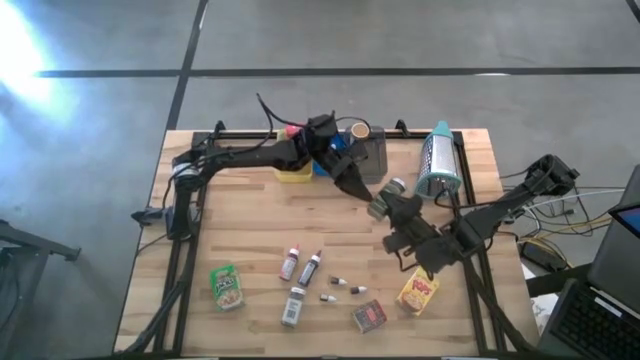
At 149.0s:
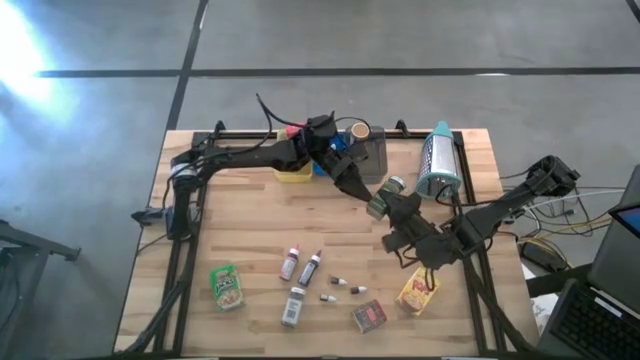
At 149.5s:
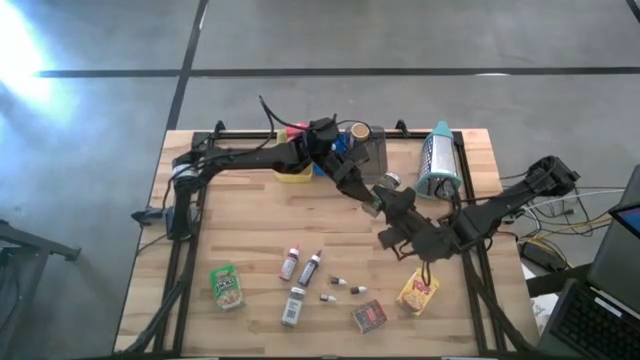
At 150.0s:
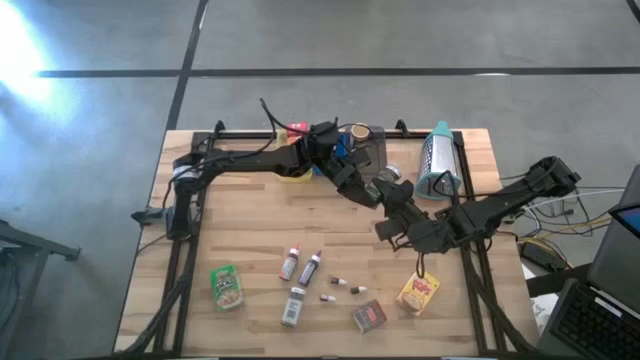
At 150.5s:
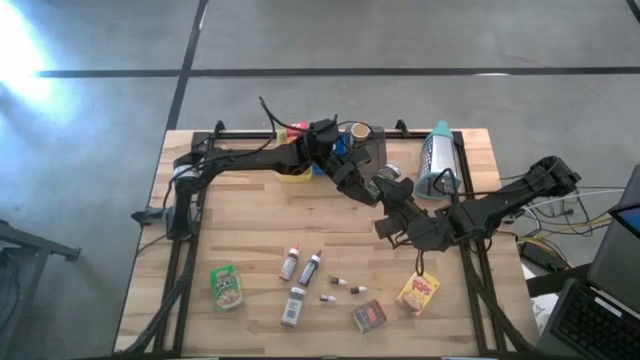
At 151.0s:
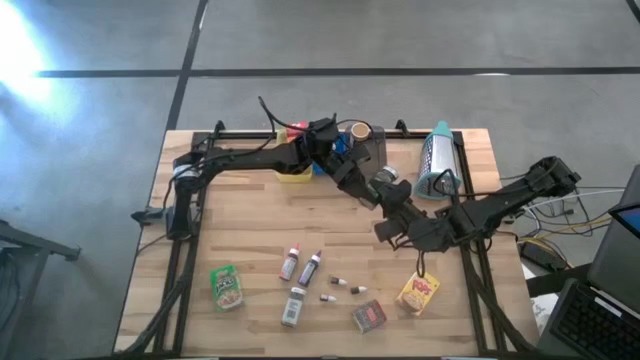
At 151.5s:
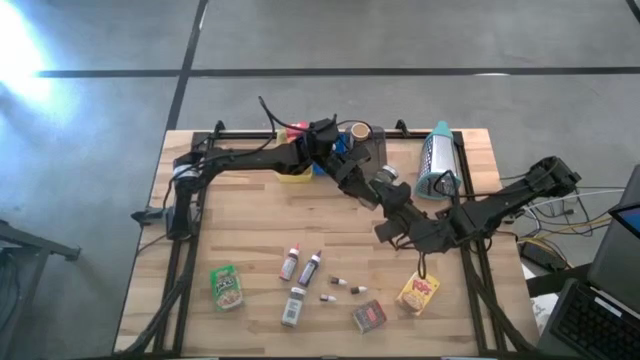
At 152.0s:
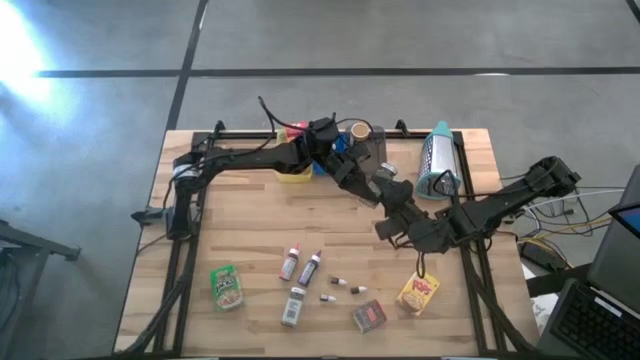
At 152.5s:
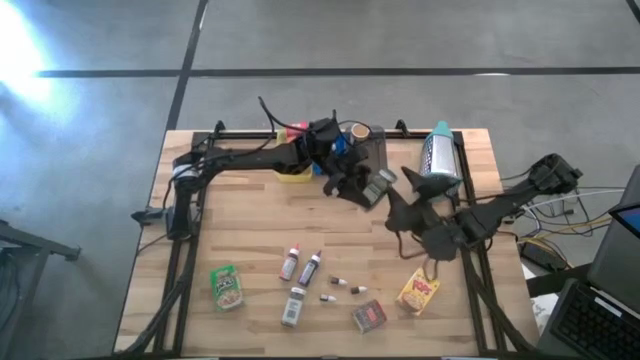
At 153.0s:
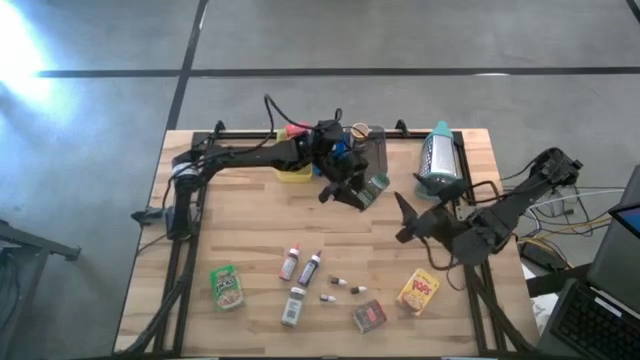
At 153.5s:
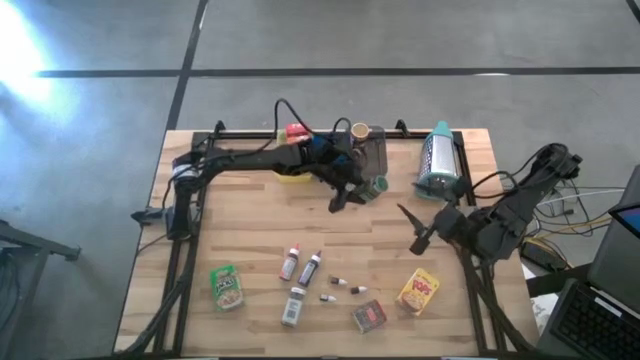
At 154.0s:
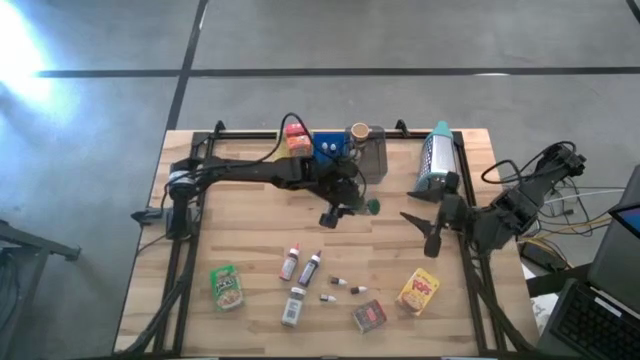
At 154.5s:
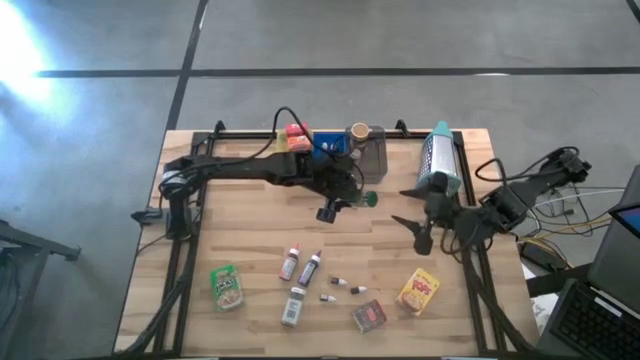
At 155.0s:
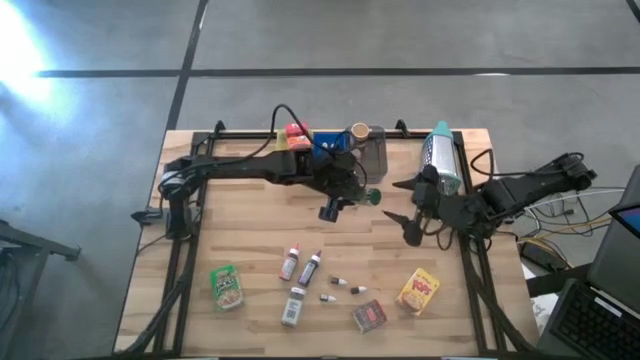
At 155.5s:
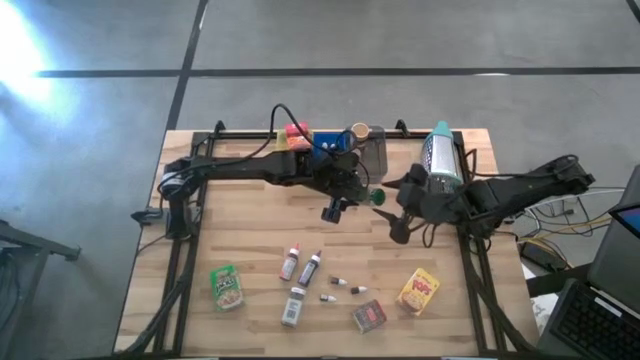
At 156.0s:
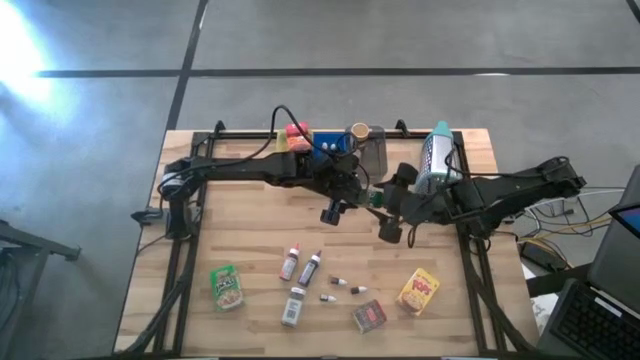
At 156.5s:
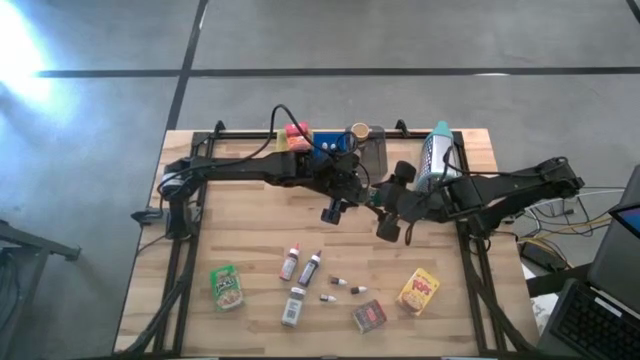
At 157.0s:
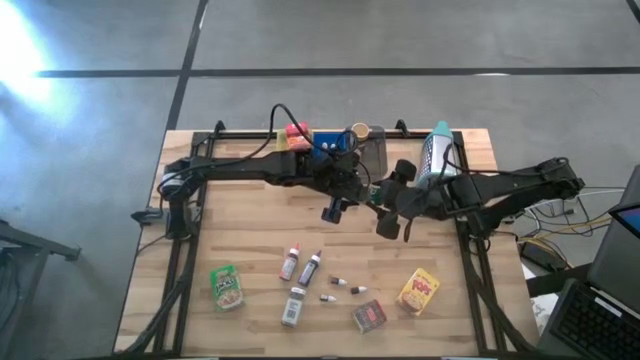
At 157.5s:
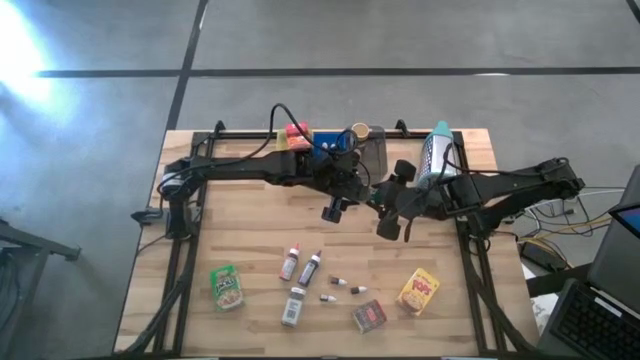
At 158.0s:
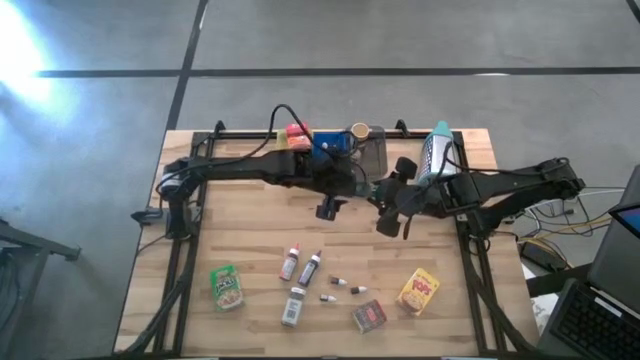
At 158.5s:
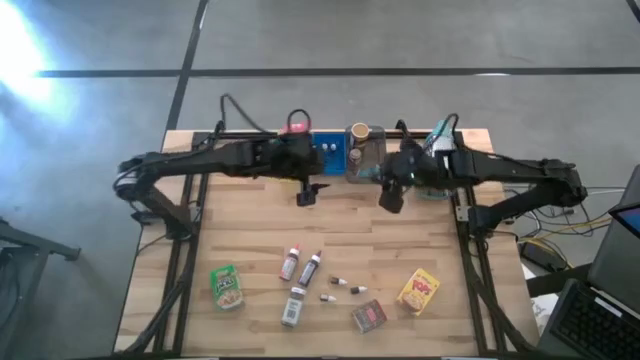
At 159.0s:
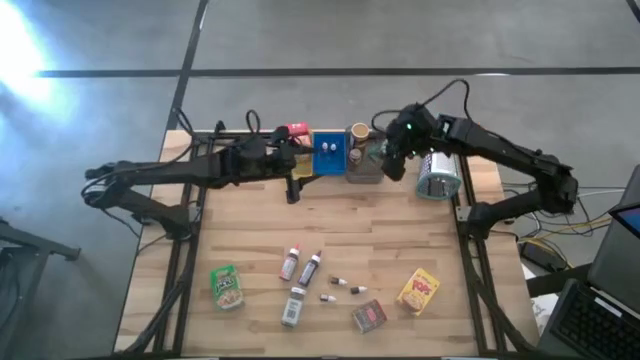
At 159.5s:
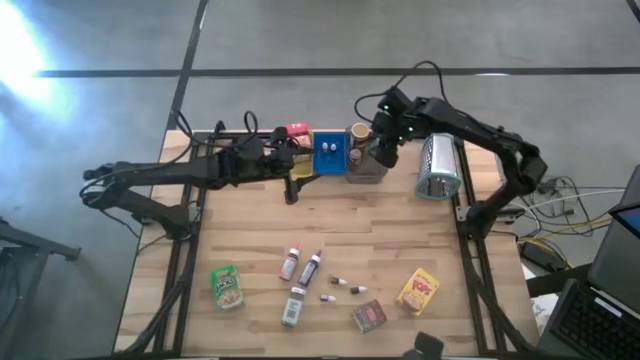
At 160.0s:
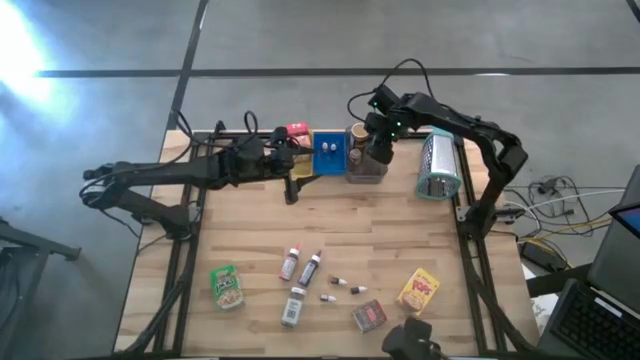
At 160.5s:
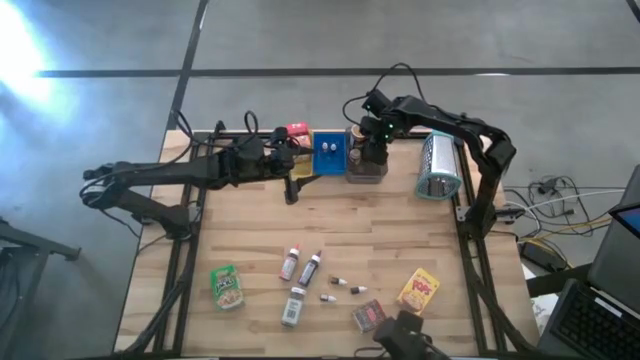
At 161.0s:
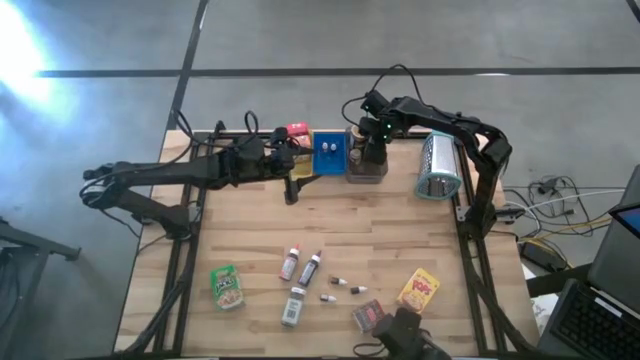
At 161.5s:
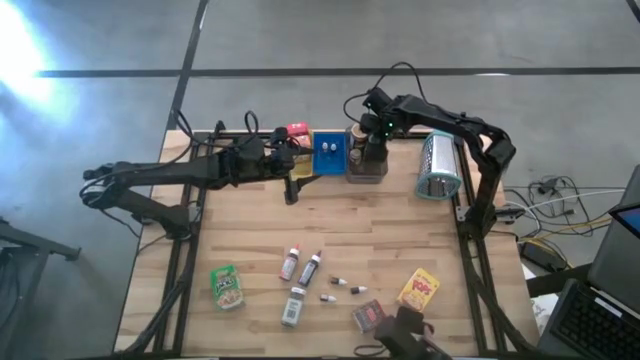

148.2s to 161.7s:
Task: Pick & Place Kitchen Items
Put the green seasoning bottle into the black bin

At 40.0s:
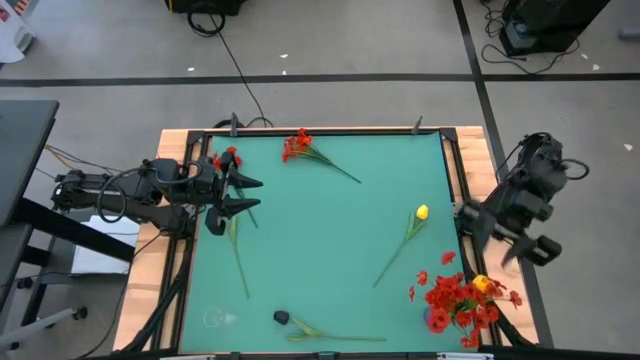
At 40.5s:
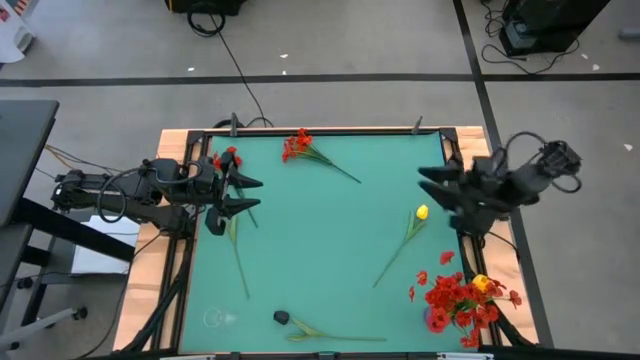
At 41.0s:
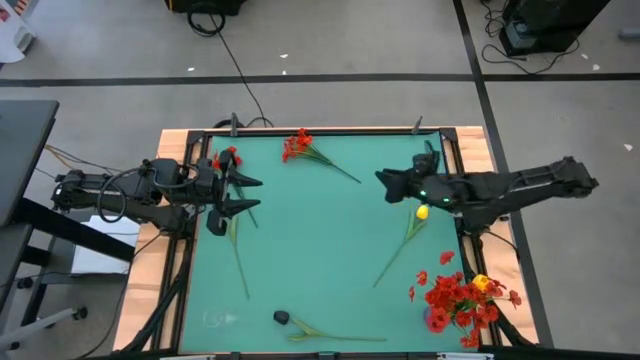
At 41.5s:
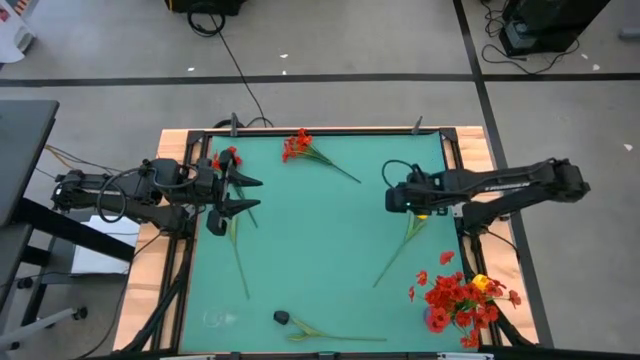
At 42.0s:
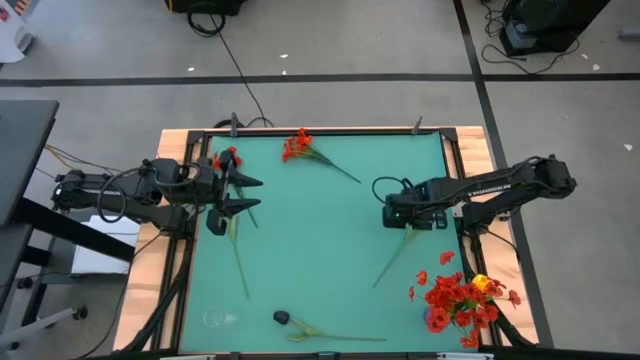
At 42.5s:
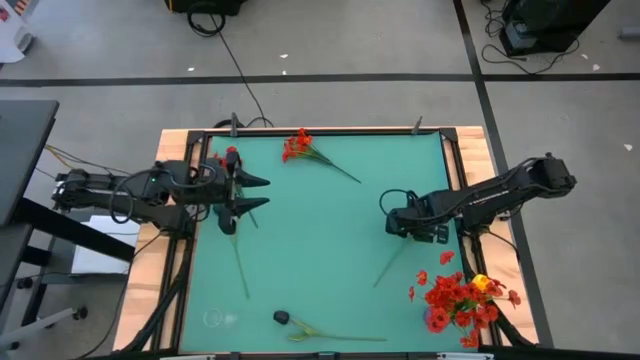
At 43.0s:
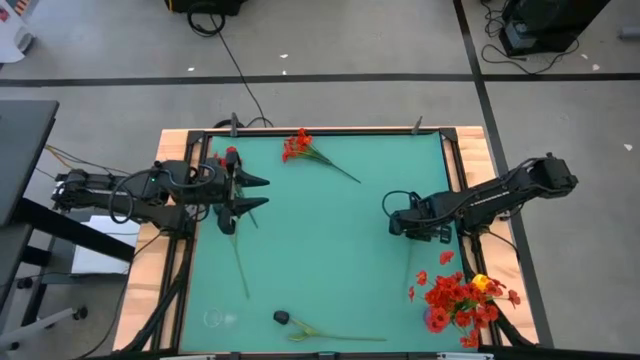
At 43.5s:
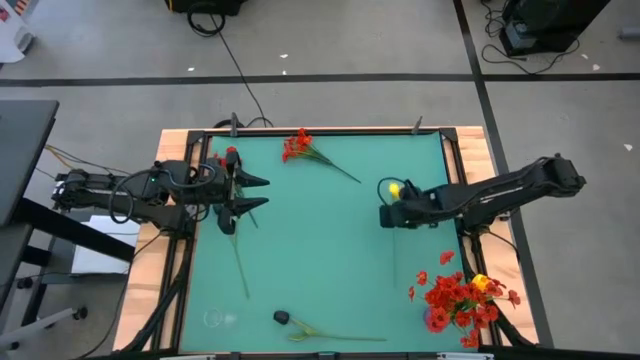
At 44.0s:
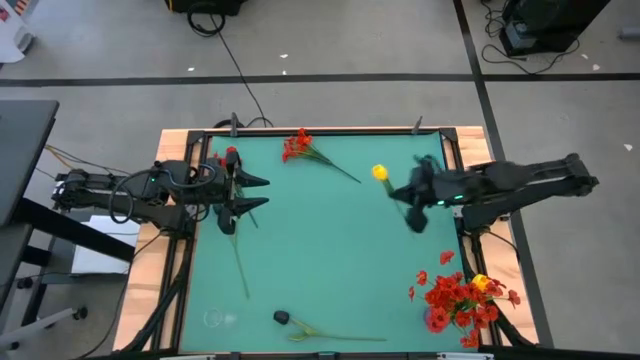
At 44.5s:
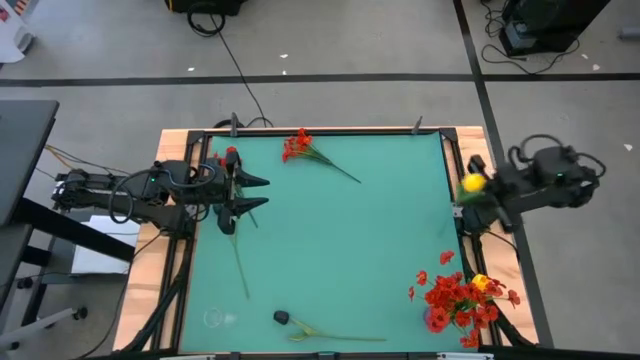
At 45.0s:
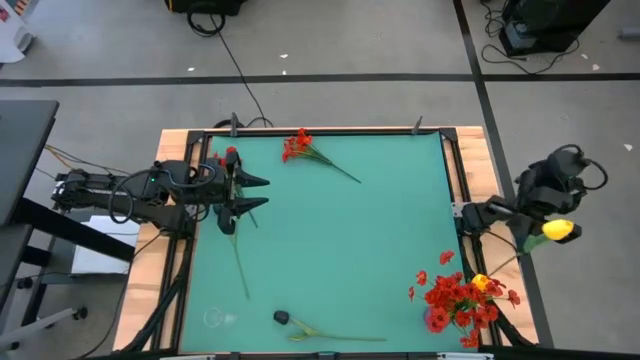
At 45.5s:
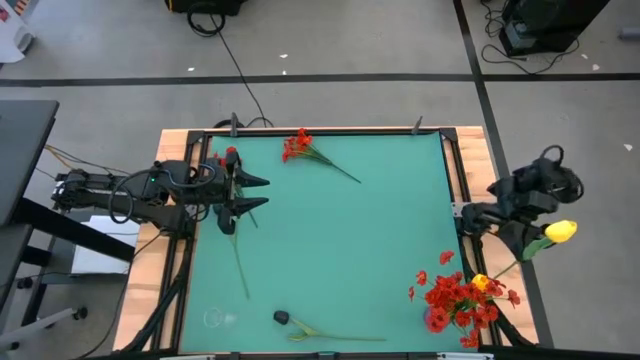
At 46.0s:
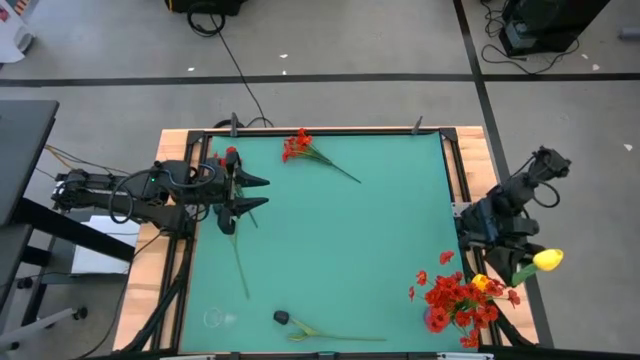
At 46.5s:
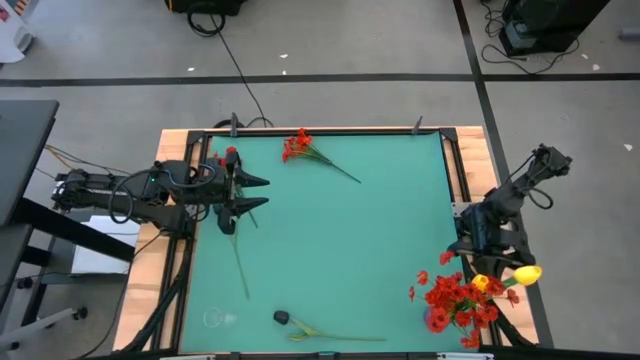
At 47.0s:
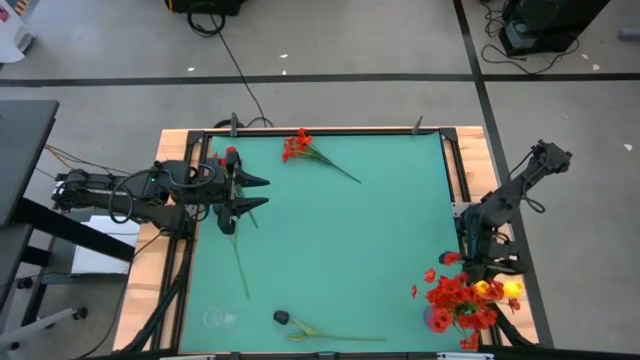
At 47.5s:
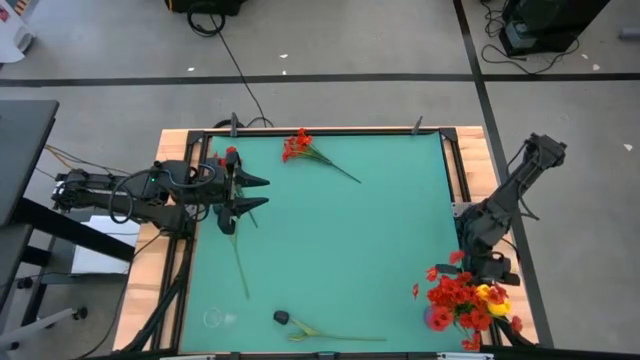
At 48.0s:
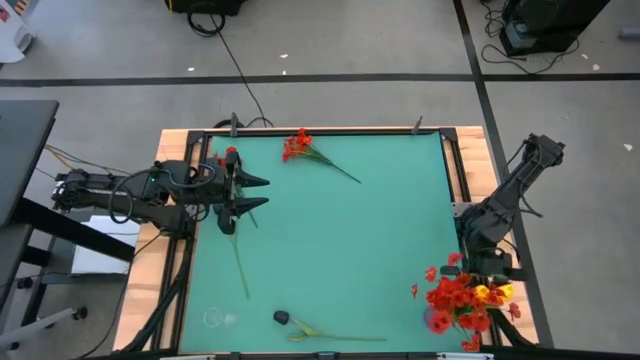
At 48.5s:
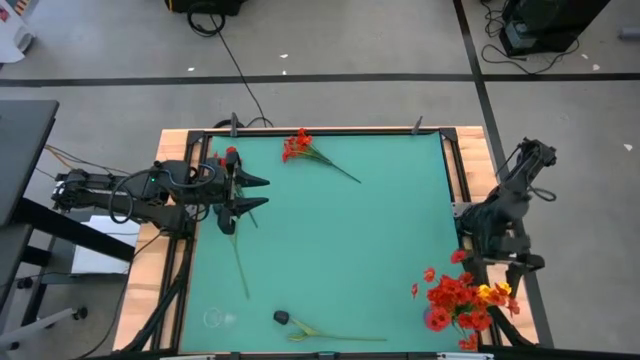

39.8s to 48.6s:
Task: Sort flowers into vase by color
Put the yellow tulip into the violet vase
